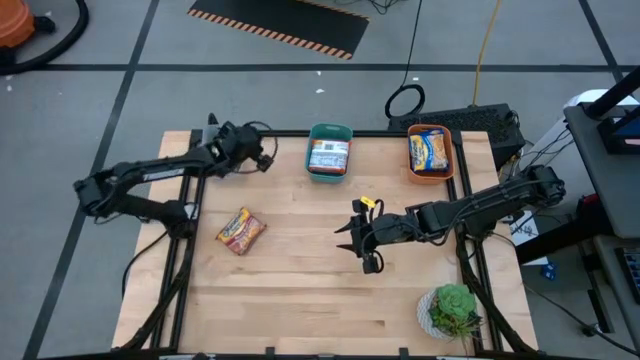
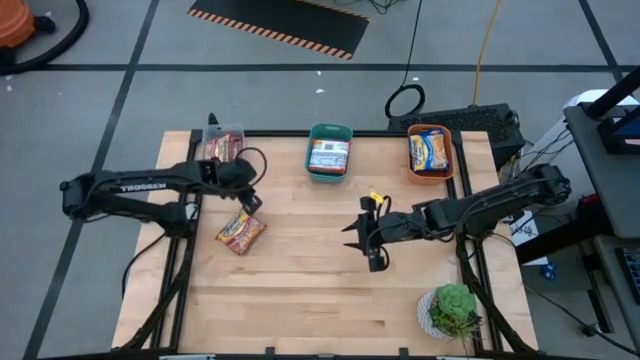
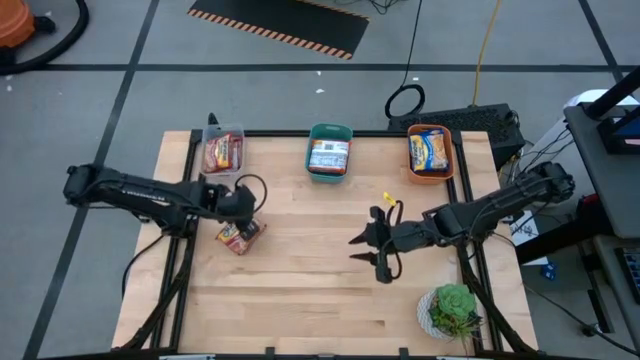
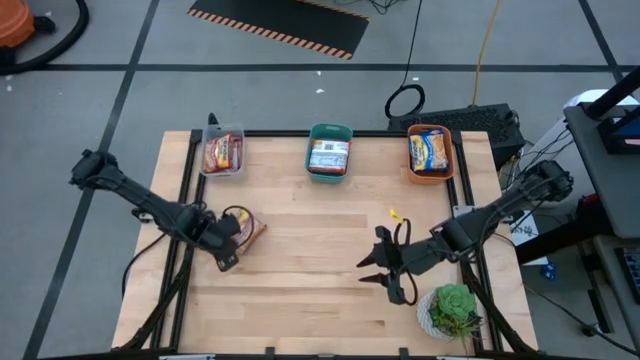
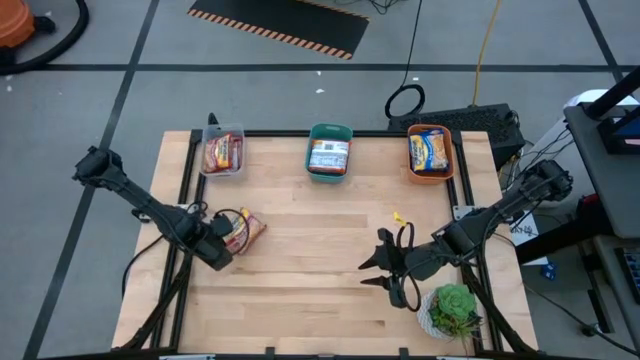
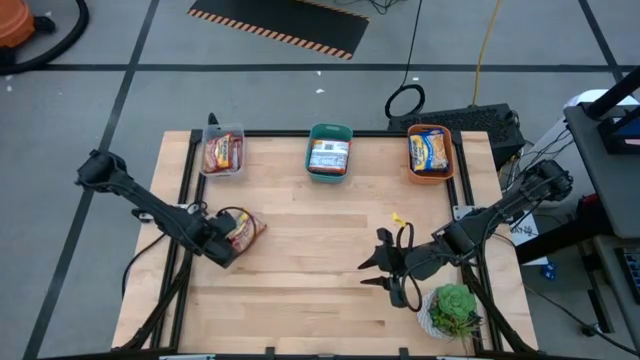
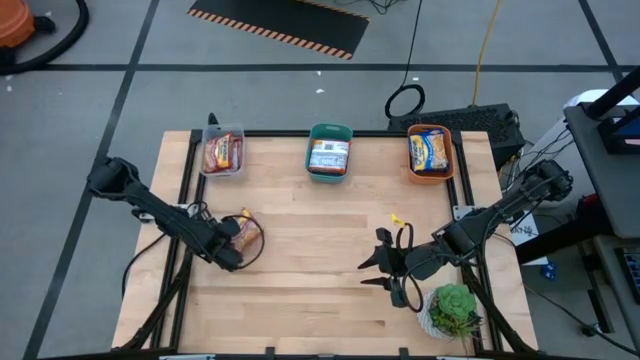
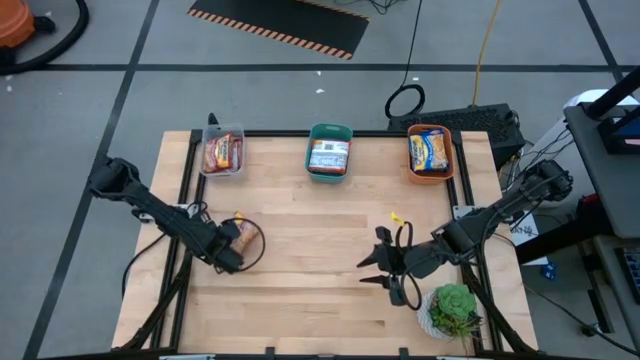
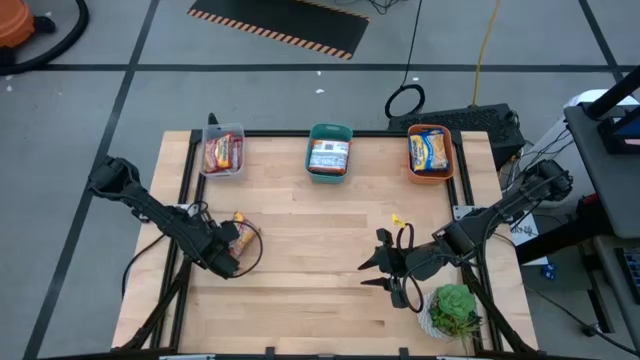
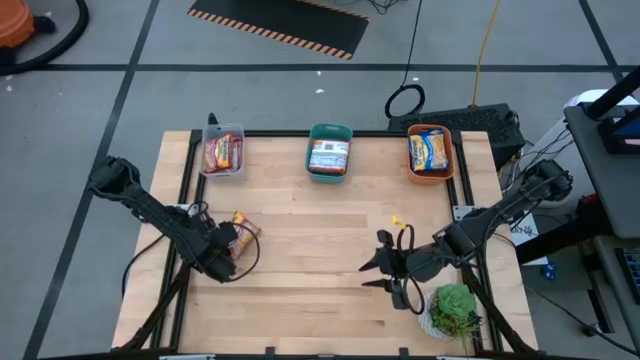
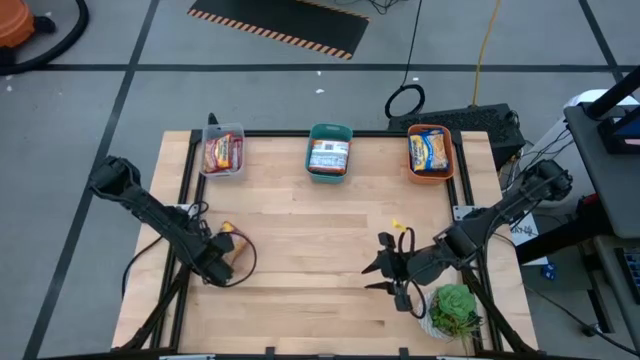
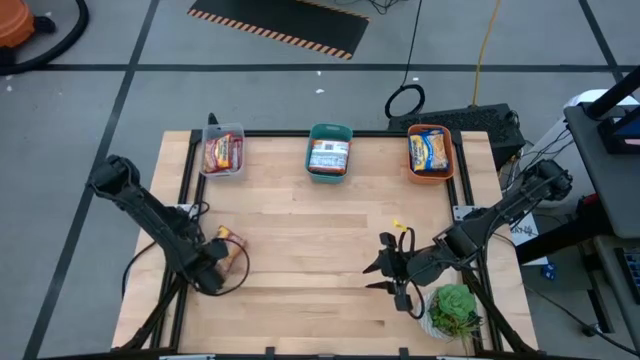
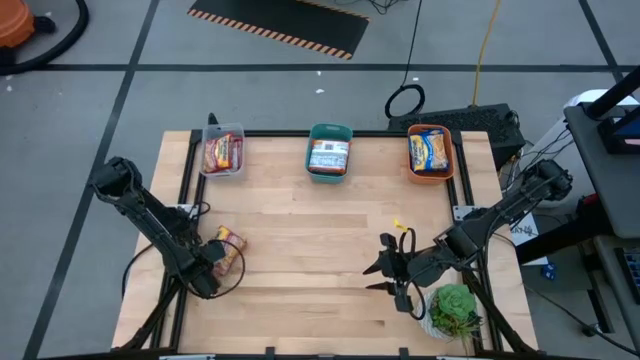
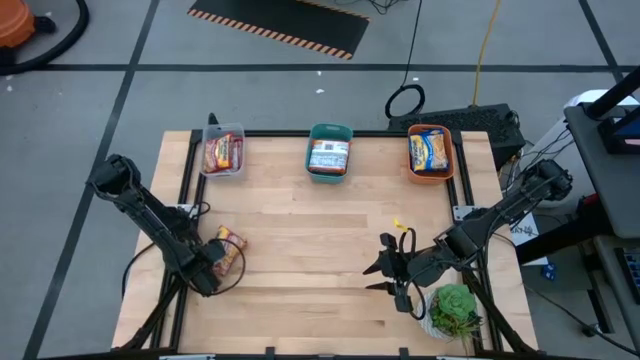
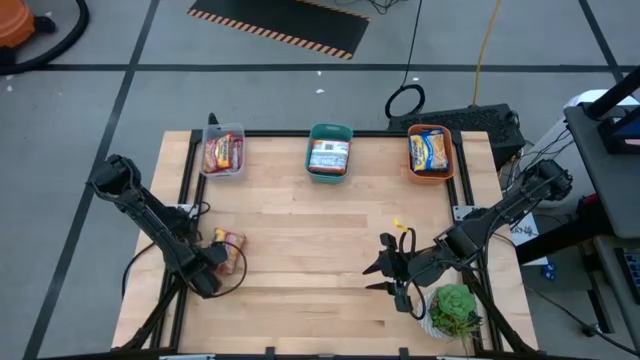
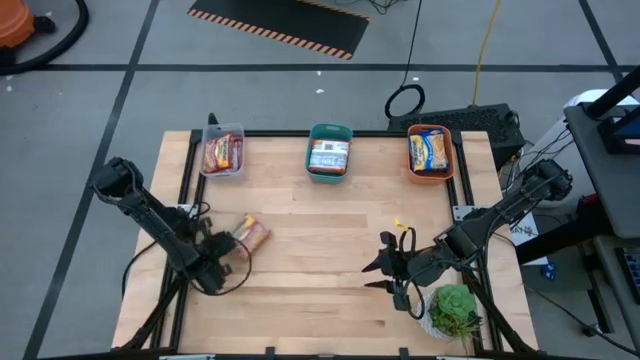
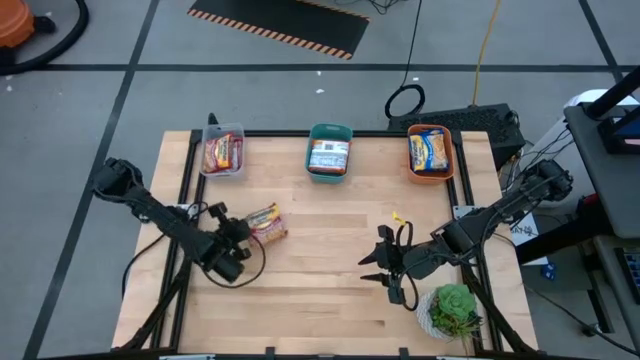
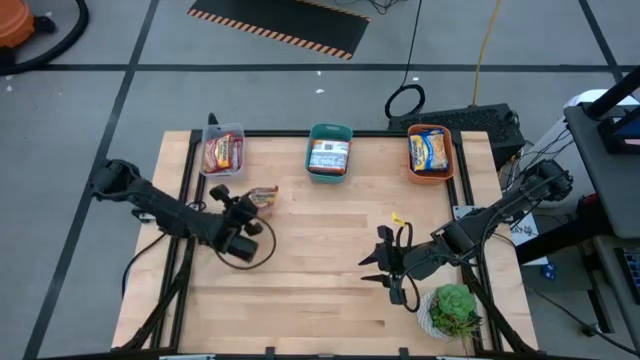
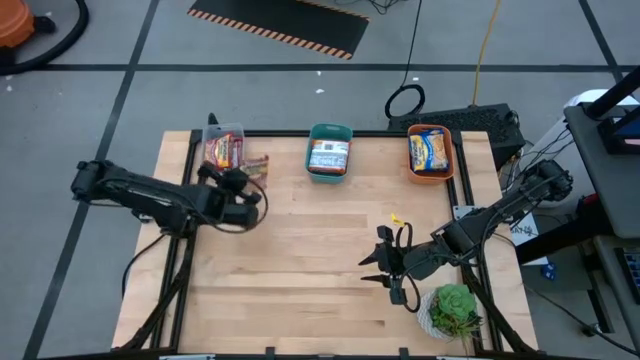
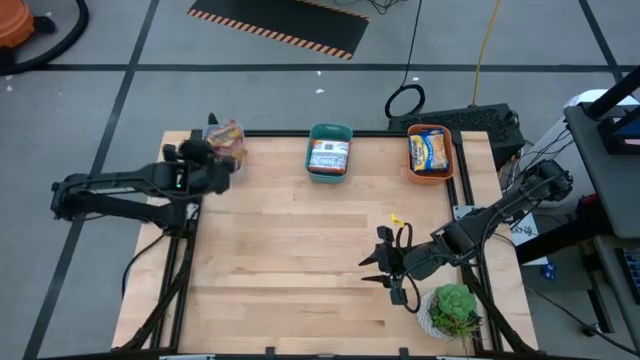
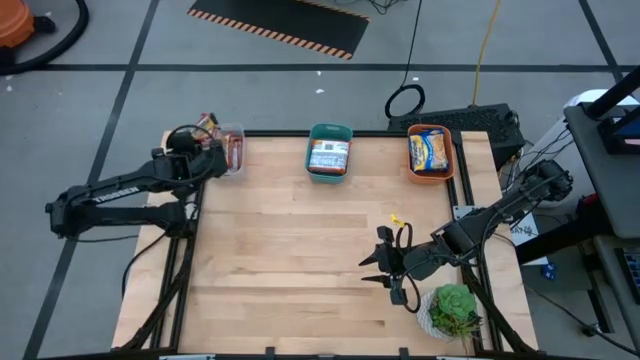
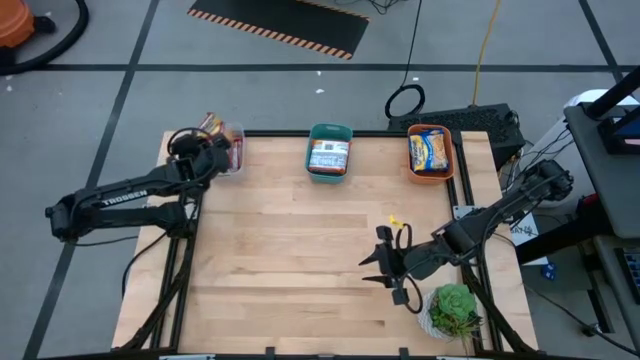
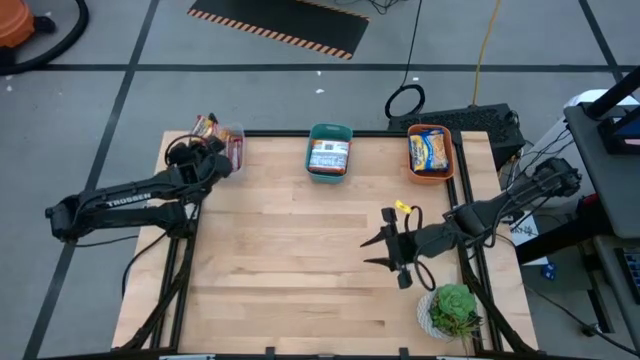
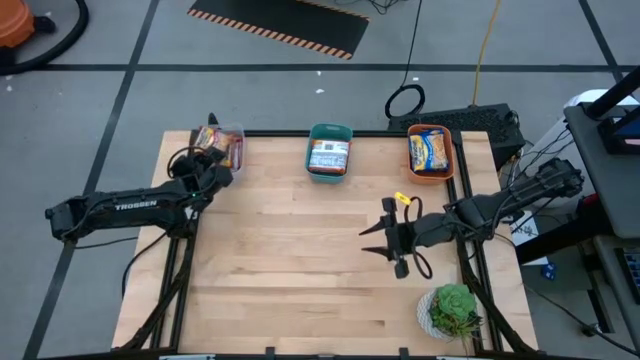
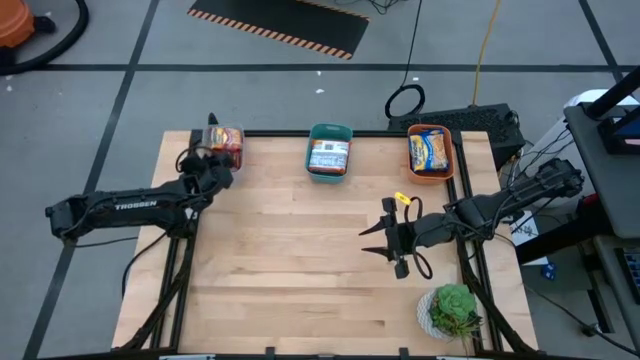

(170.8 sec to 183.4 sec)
Task: Sort Maruchan noodles
Put the red noodle pack into the transparent bin

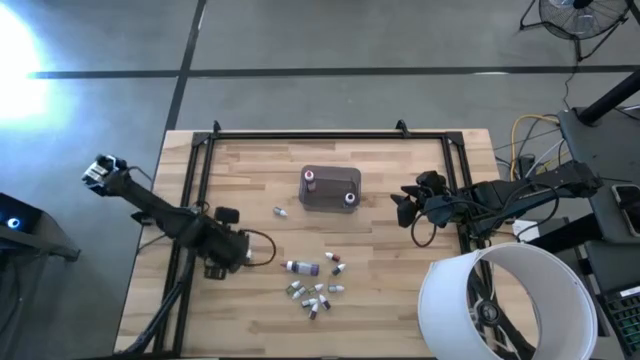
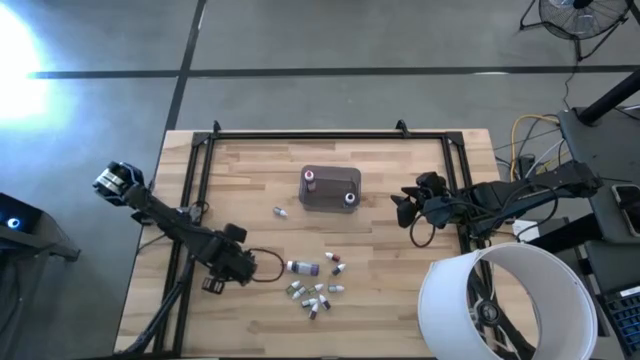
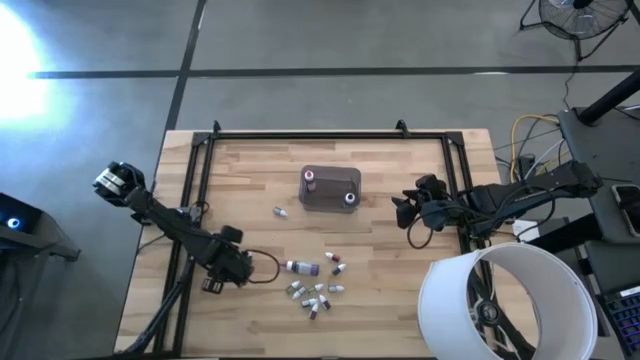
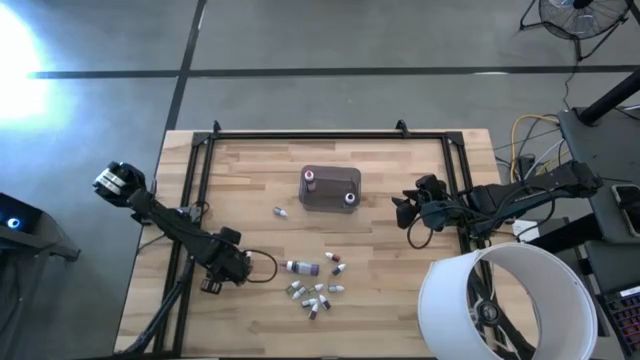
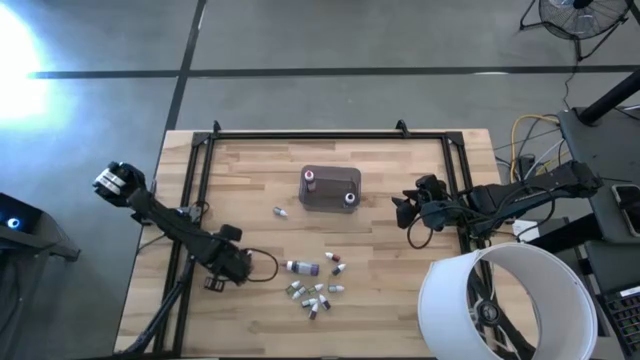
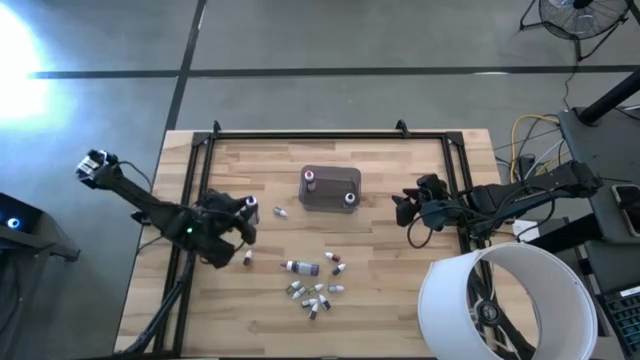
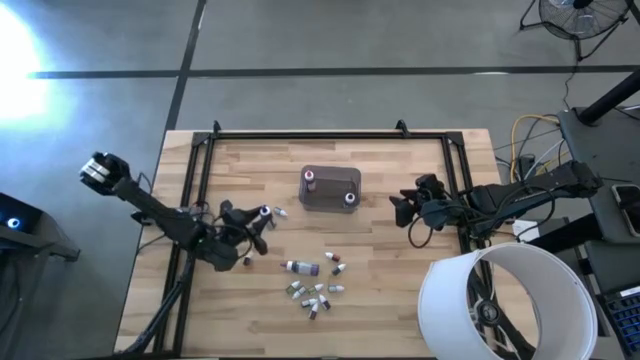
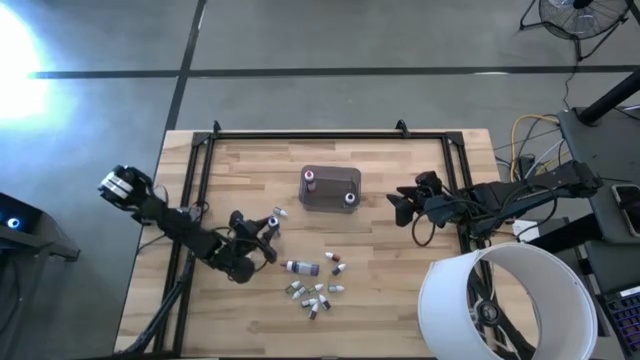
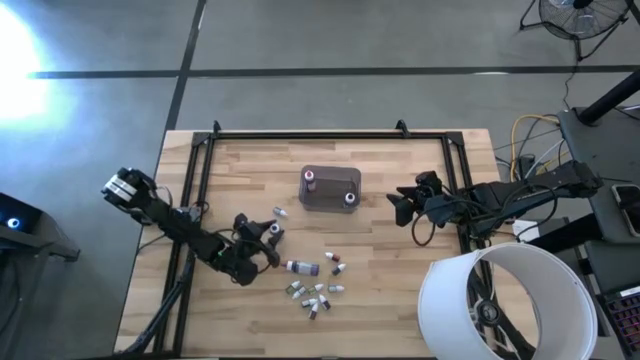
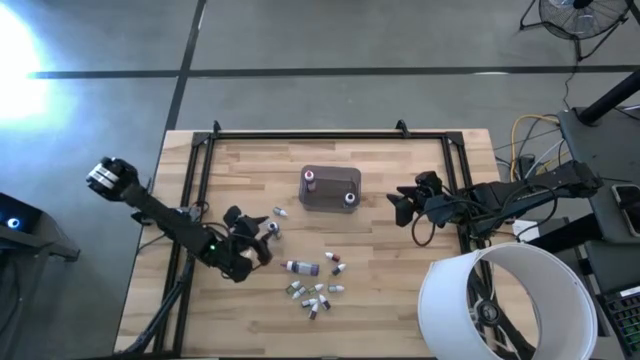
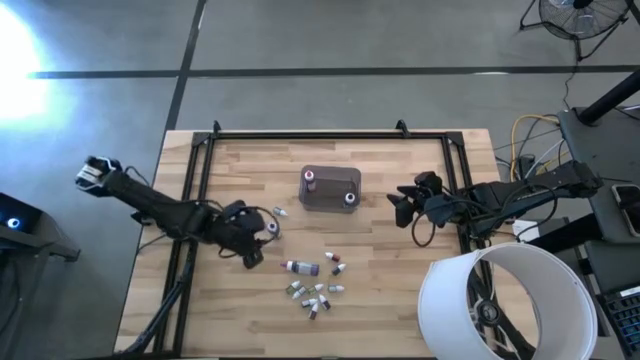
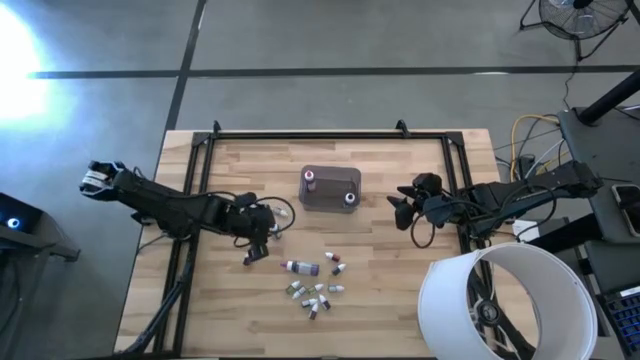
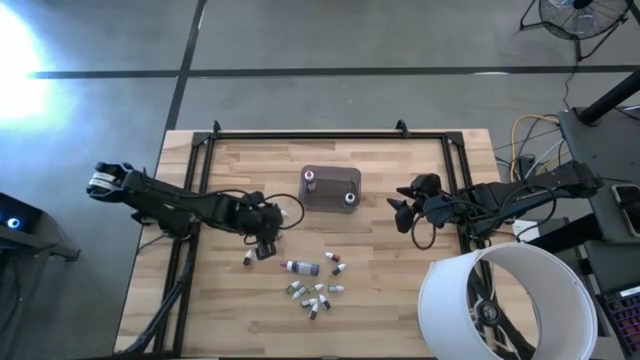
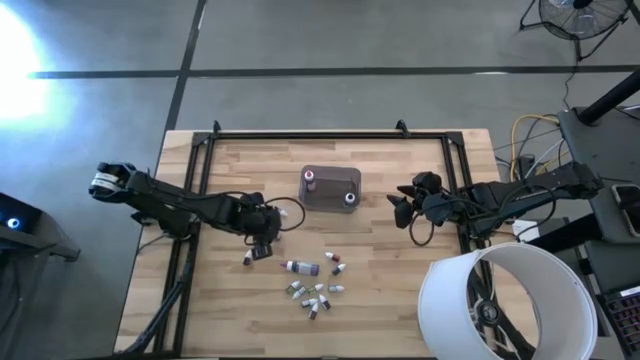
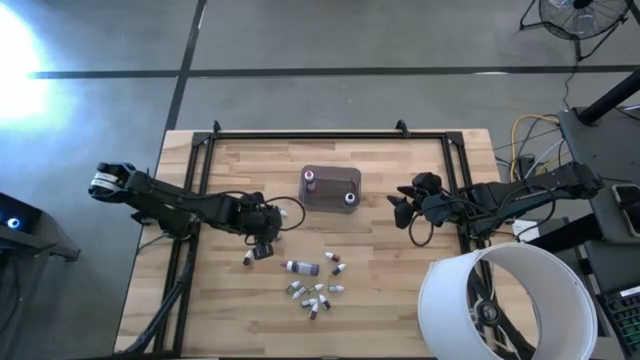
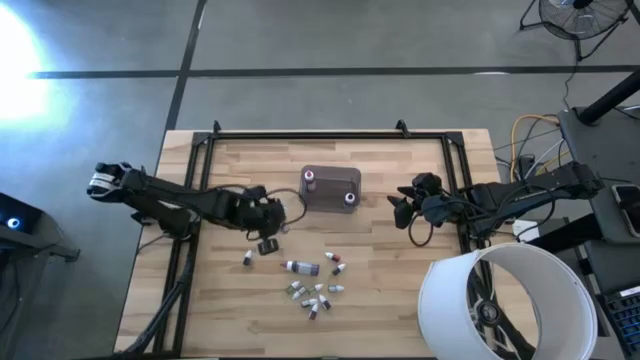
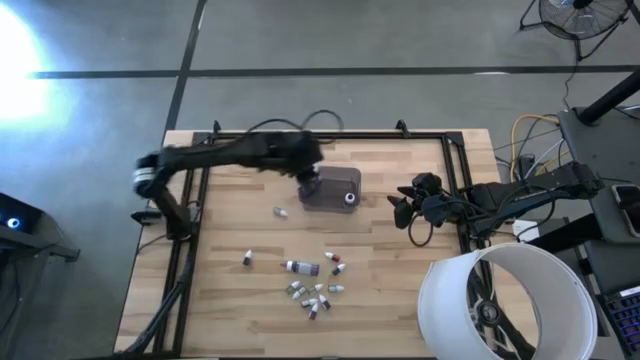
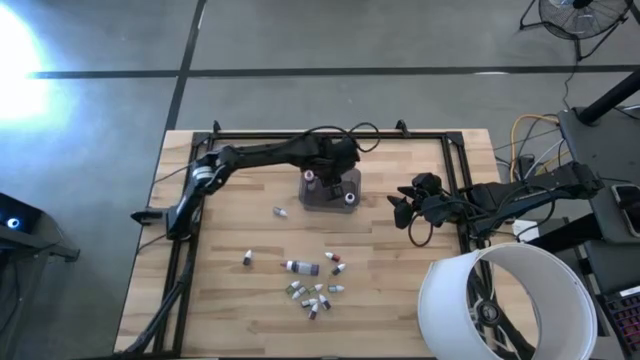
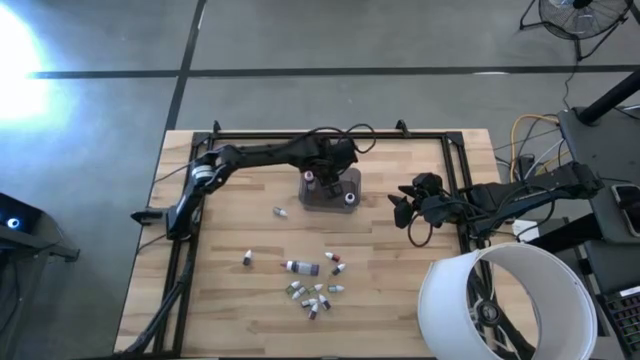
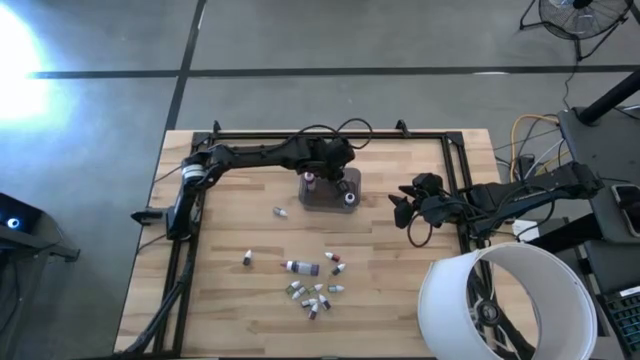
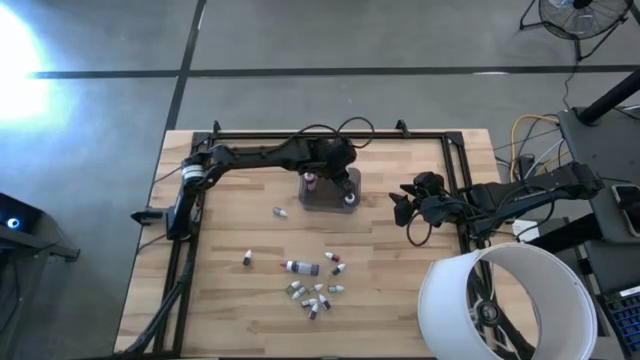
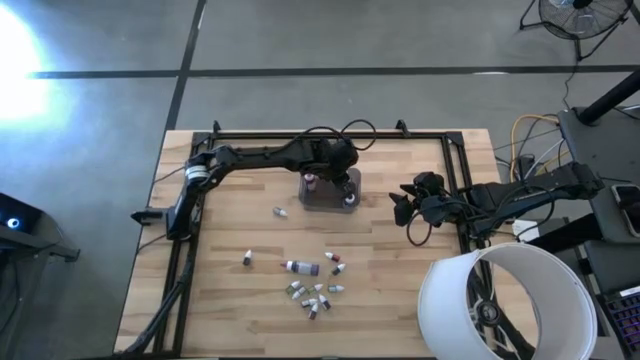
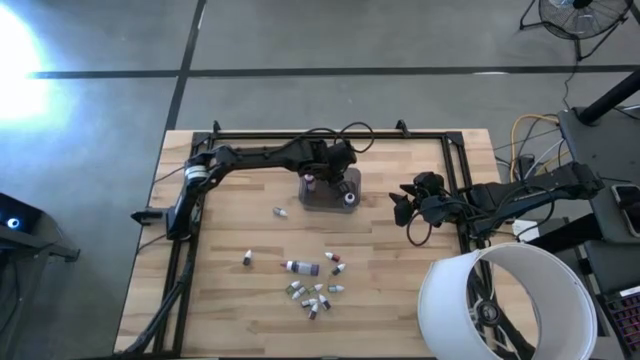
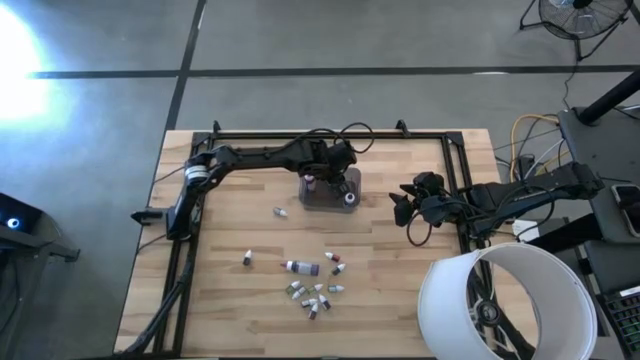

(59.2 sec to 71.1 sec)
Task: Pick & Place food coloring
Put the large blue food coloring bottle into the black bin
